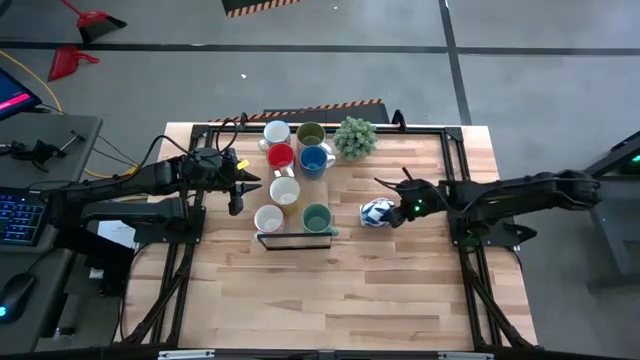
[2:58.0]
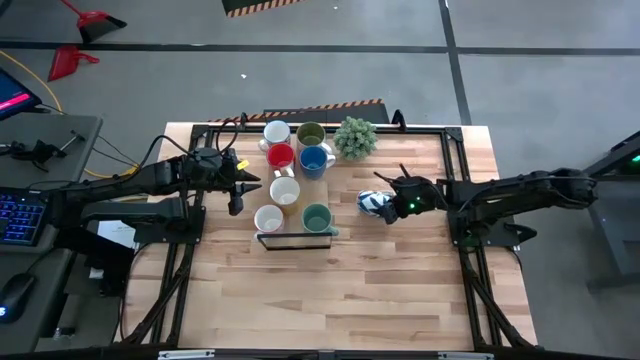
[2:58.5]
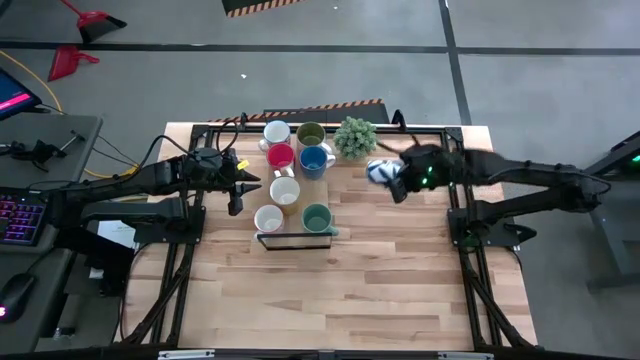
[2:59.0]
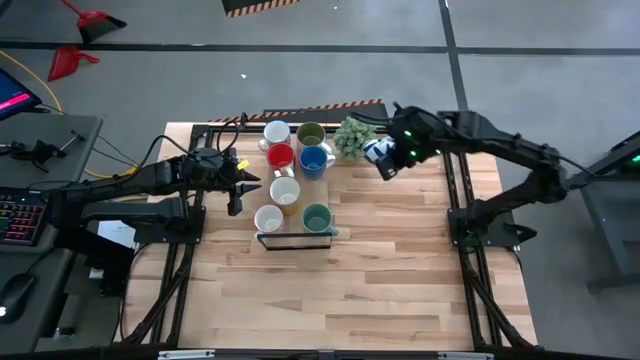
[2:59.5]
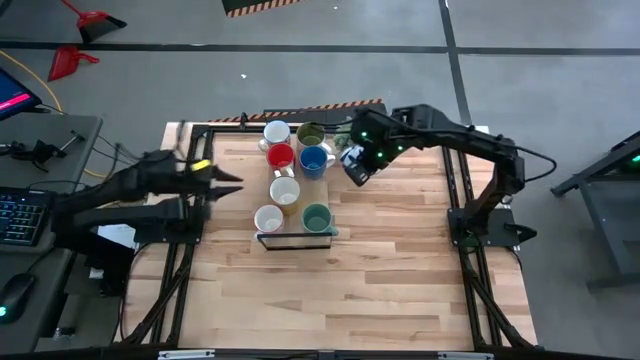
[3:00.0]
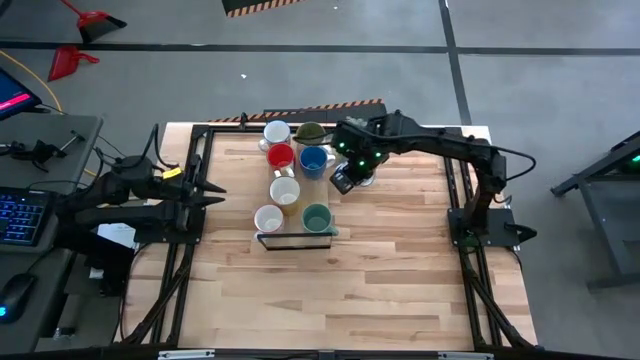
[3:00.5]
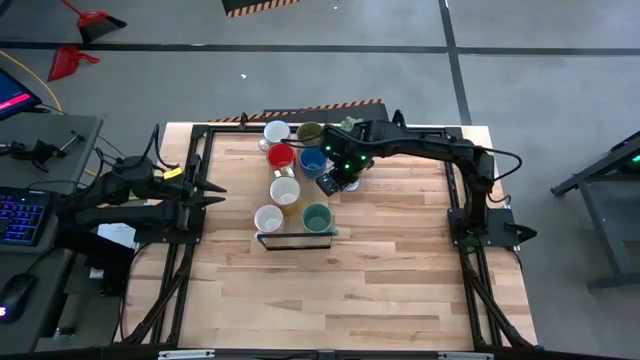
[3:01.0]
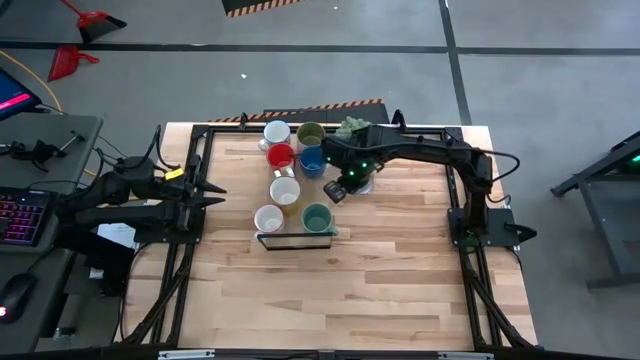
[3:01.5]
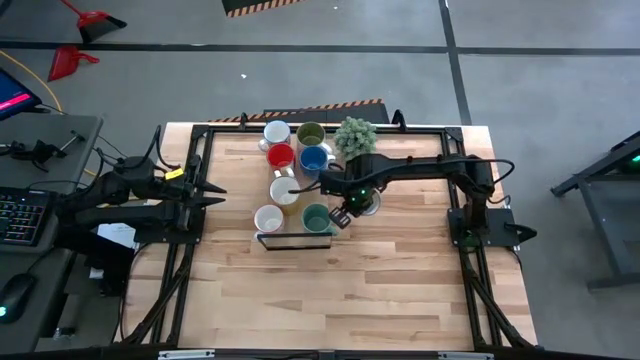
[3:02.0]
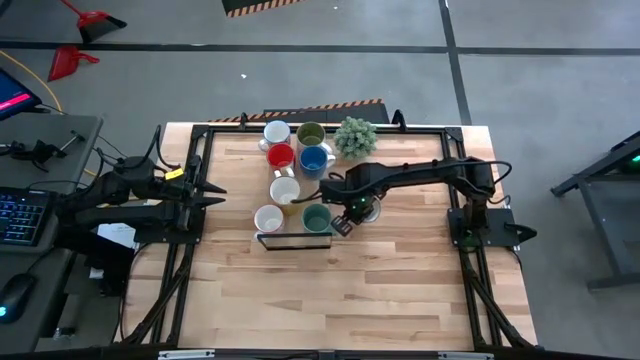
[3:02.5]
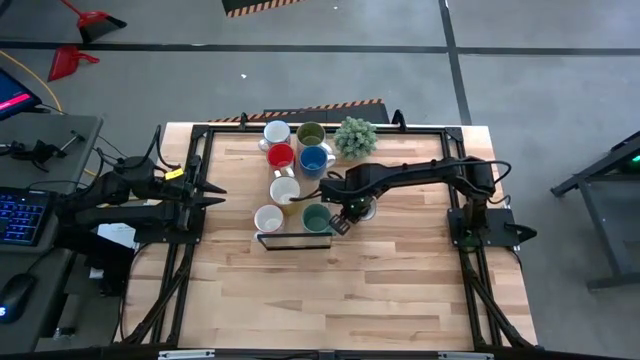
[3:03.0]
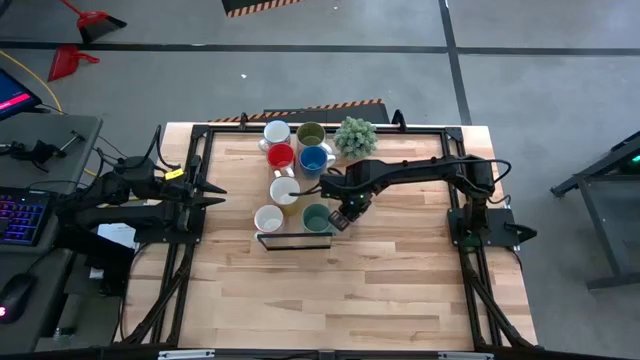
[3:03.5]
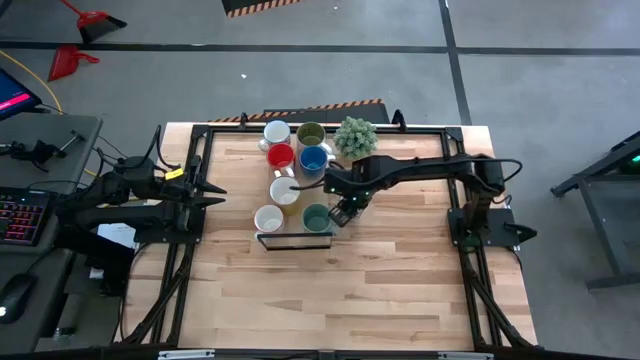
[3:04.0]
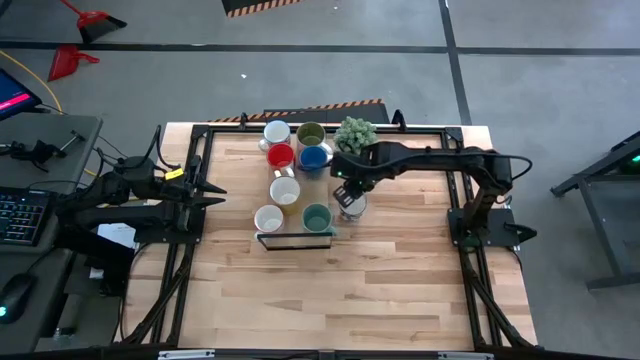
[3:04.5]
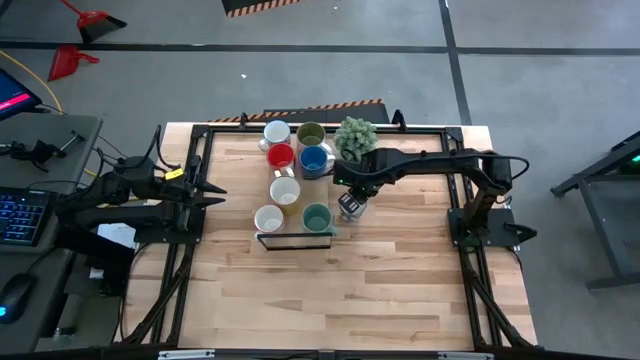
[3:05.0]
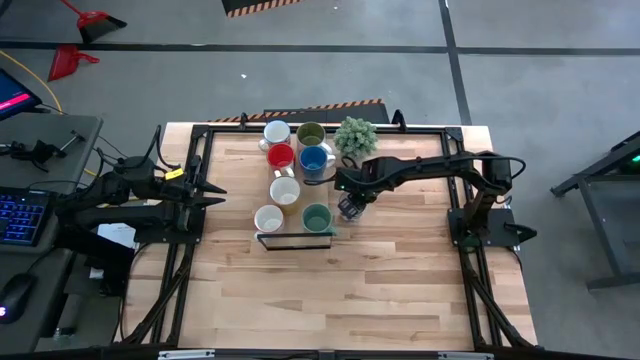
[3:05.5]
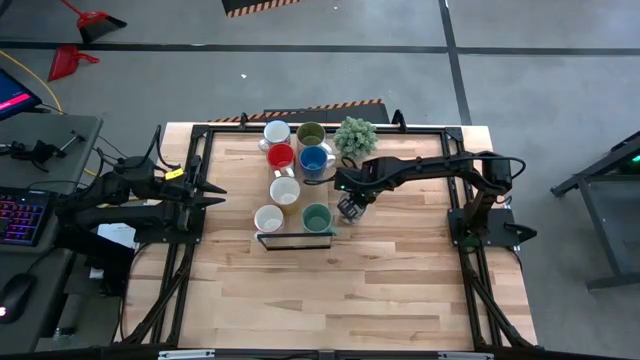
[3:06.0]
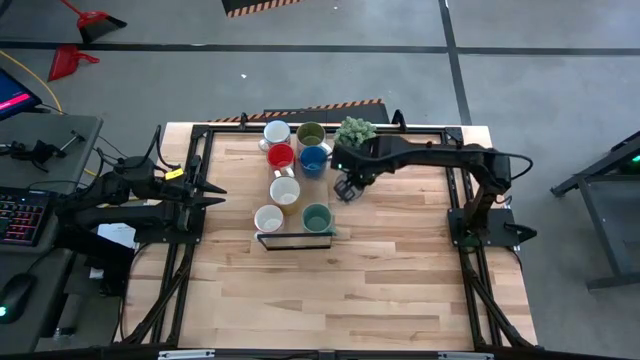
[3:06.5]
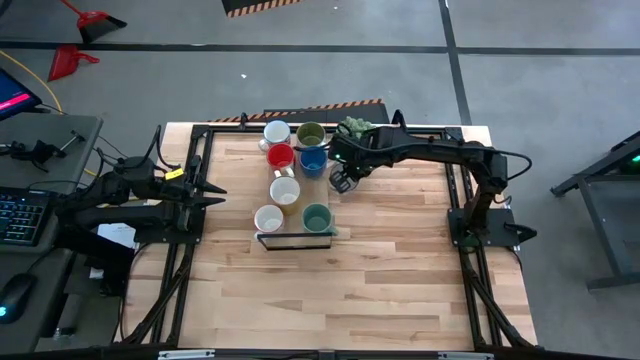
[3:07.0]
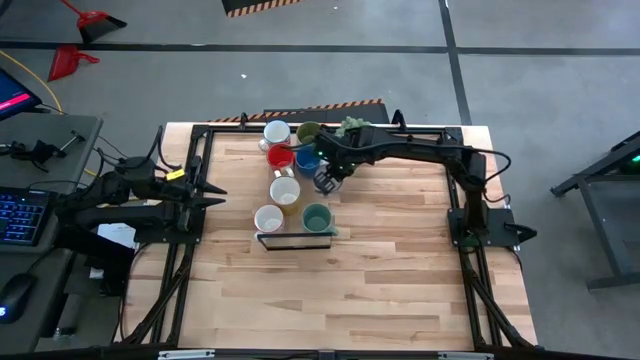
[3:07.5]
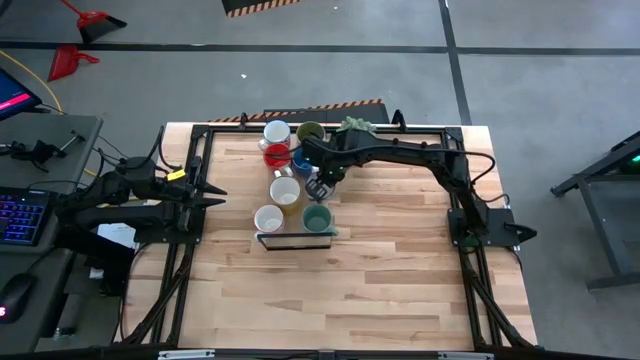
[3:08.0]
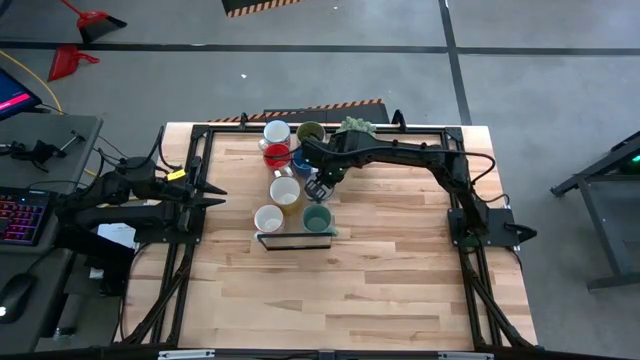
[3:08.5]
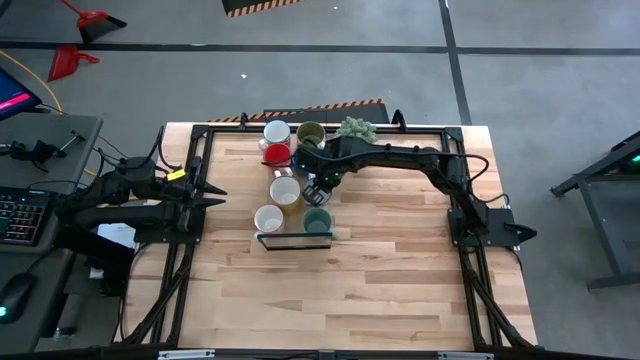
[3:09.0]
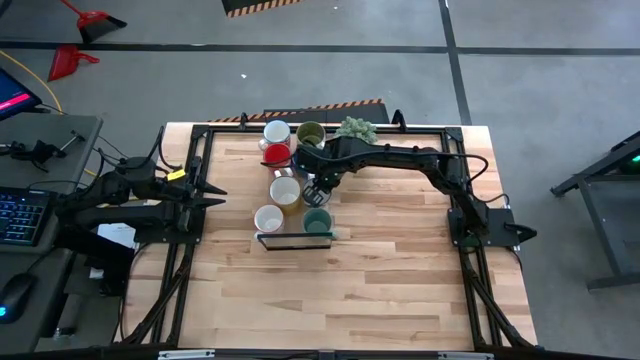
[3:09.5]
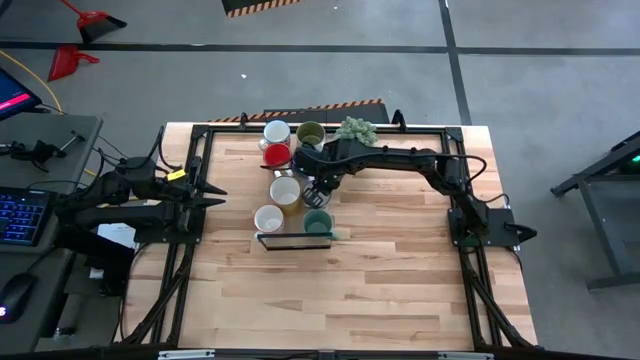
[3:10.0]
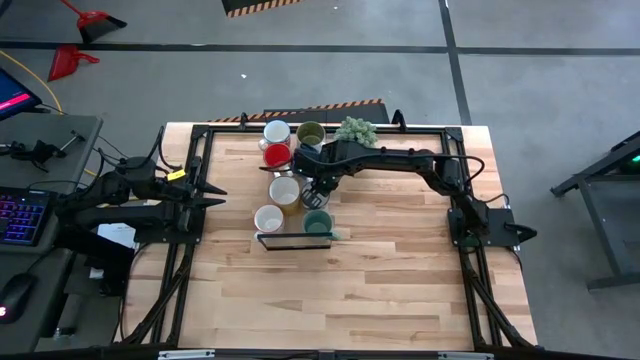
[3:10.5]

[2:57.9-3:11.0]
Task: Place coffee mugs
Put the blue patterned mug on the shelf

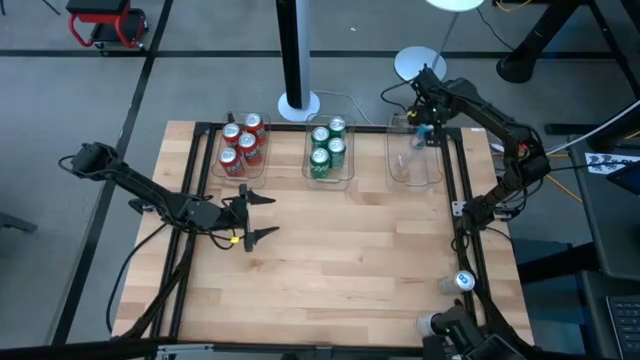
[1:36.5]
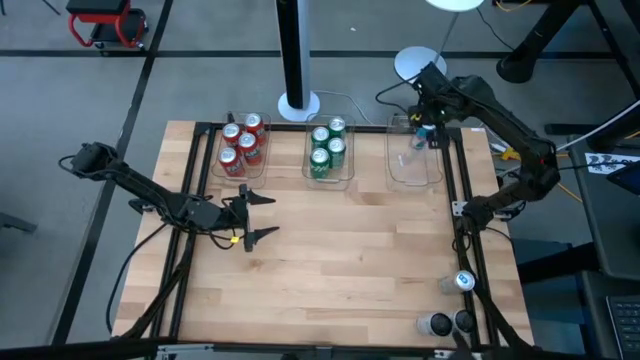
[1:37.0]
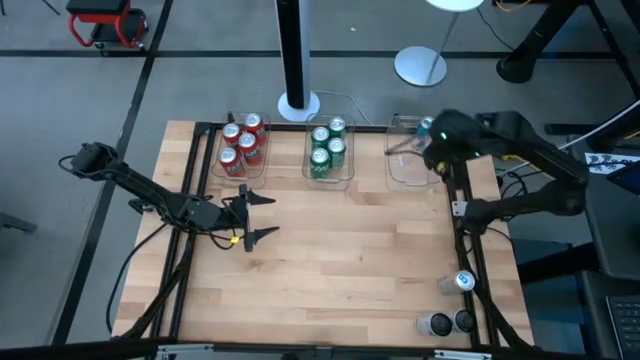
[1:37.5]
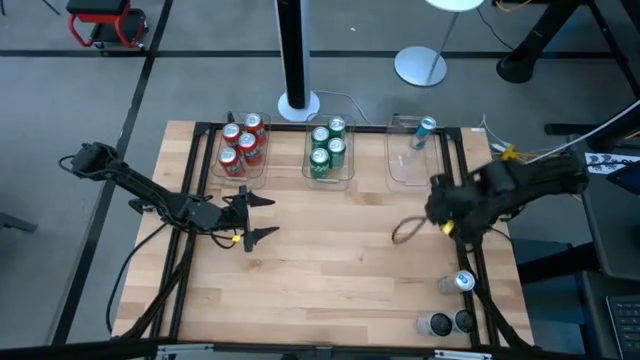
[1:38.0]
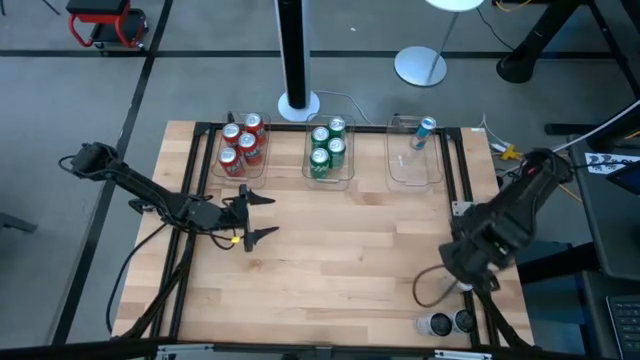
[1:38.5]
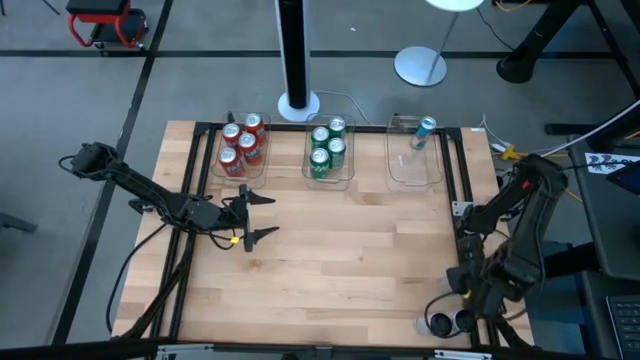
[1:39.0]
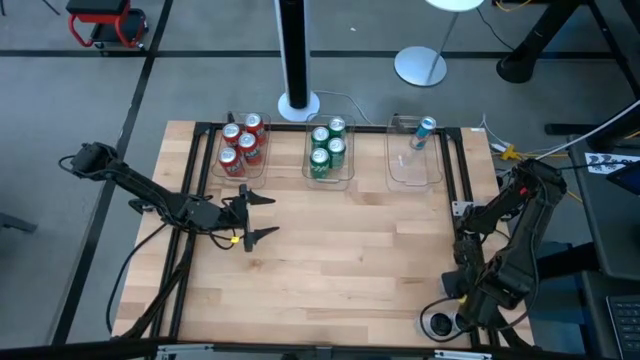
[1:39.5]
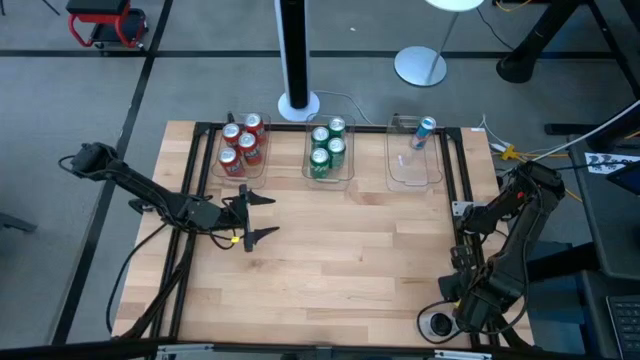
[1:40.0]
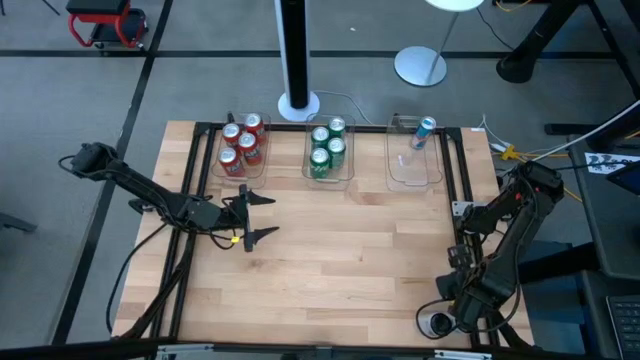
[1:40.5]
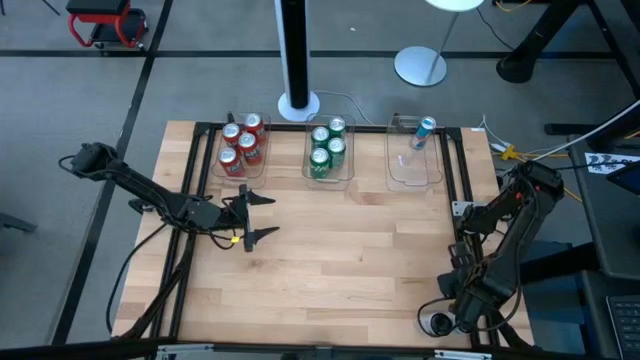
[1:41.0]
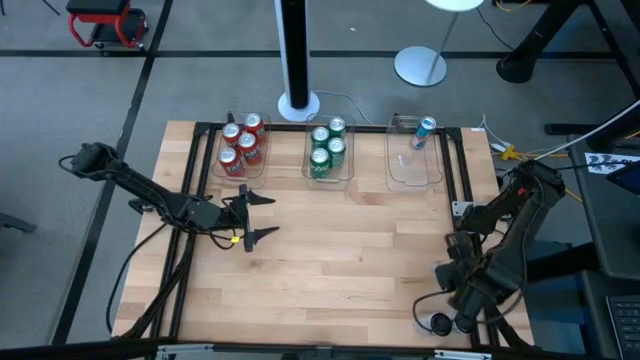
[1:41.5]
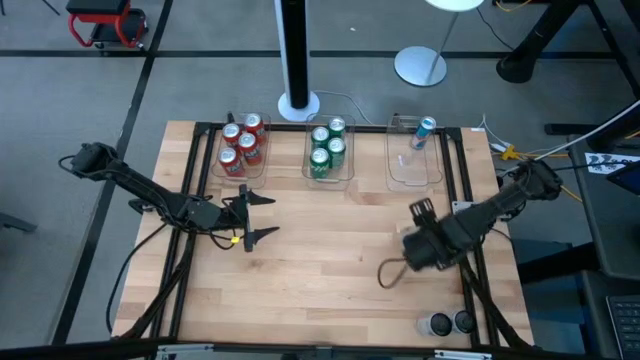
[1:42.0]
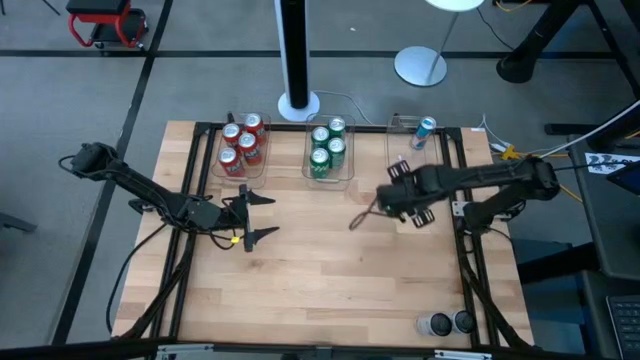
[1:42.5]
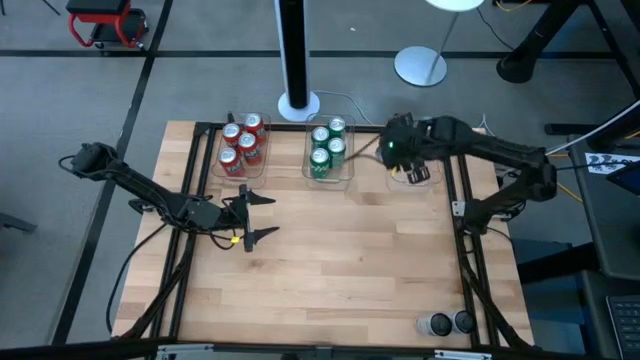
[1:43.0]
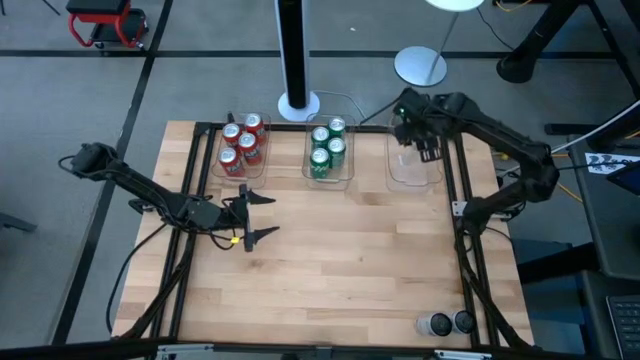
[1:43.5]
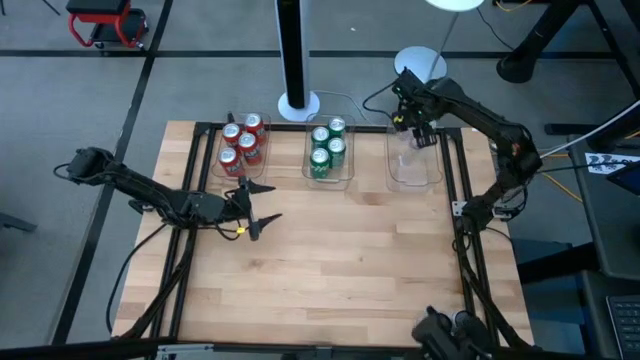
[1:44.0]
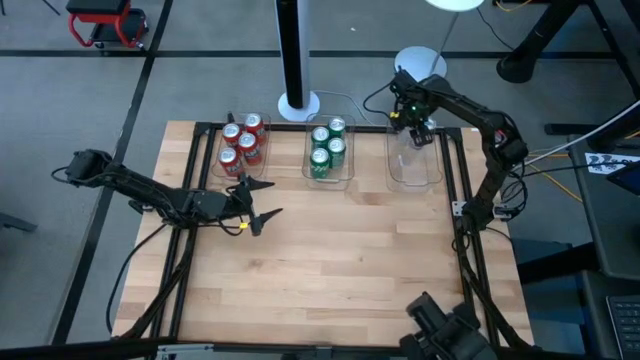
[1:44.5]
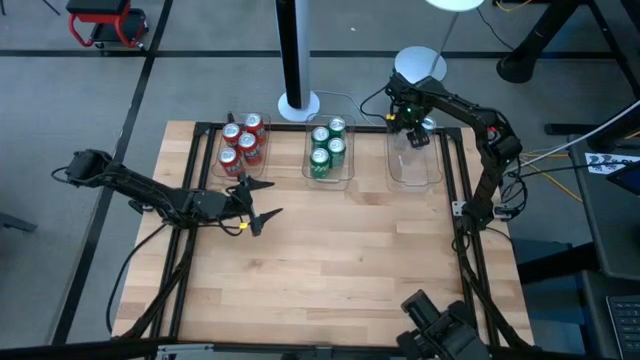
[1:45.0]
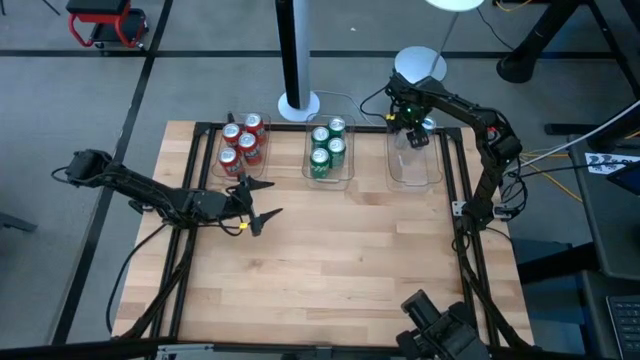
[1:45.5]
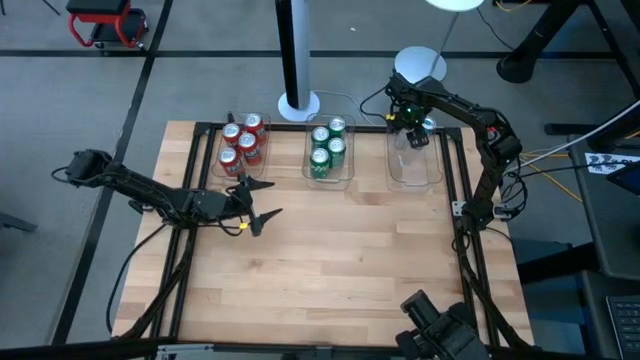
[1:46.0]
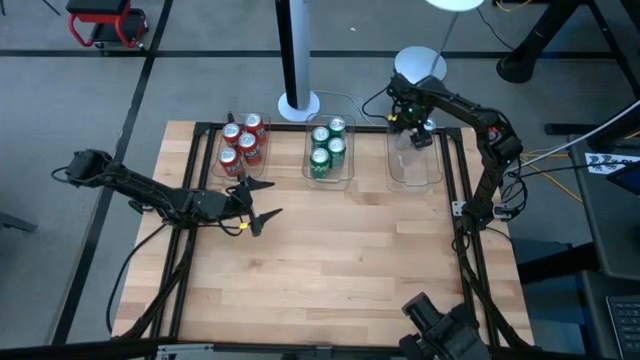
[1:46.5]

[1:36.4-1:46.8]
Task: Sort soda cans
Put the blue soda can into the right transparent bin
